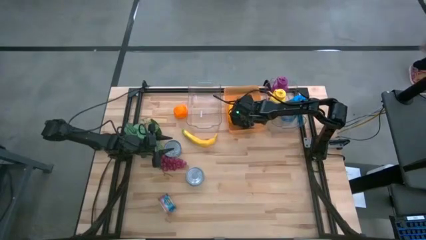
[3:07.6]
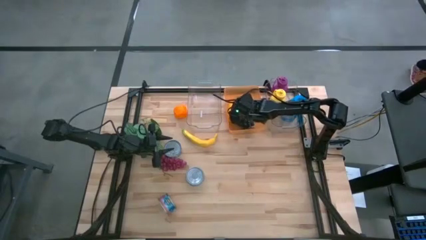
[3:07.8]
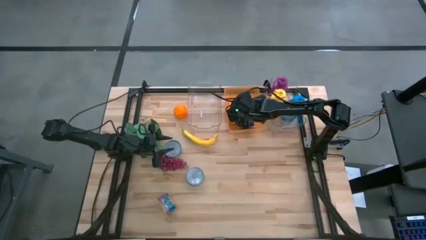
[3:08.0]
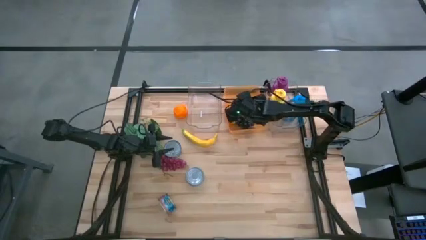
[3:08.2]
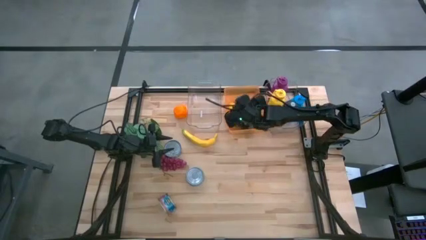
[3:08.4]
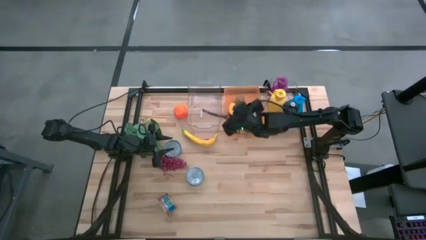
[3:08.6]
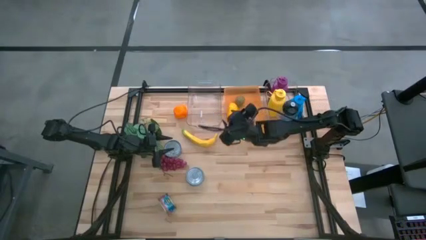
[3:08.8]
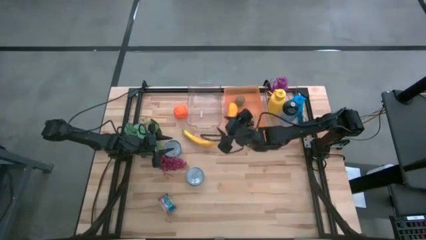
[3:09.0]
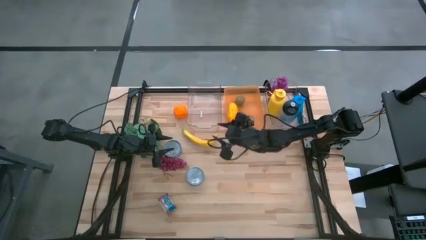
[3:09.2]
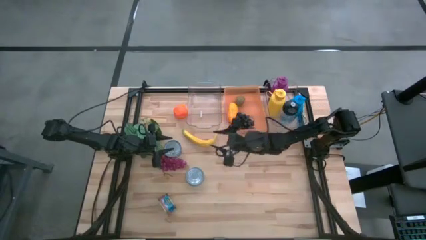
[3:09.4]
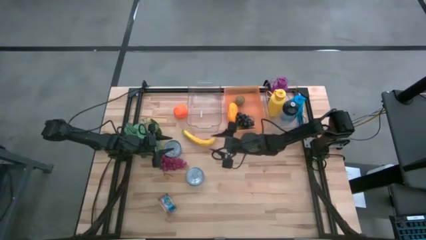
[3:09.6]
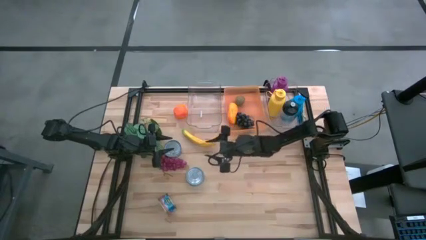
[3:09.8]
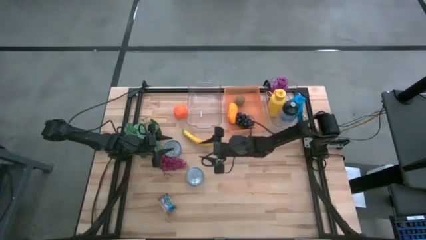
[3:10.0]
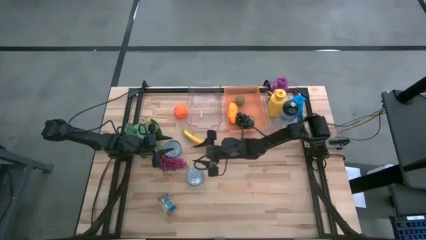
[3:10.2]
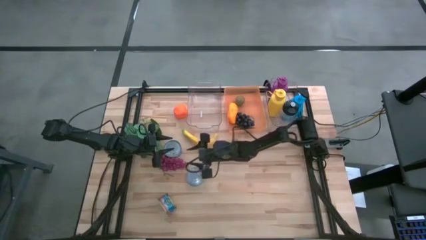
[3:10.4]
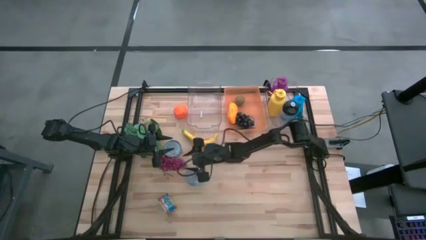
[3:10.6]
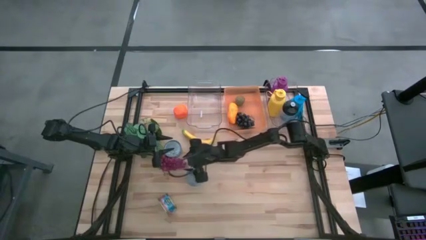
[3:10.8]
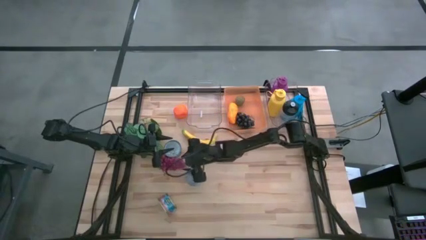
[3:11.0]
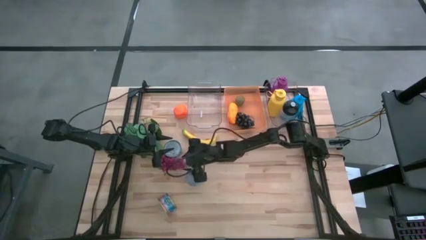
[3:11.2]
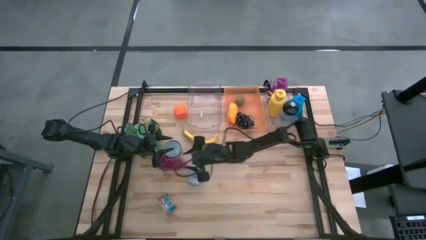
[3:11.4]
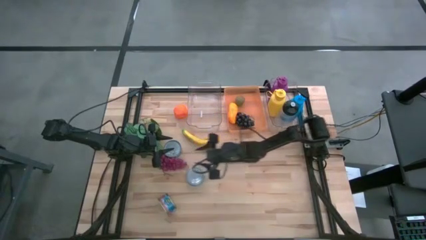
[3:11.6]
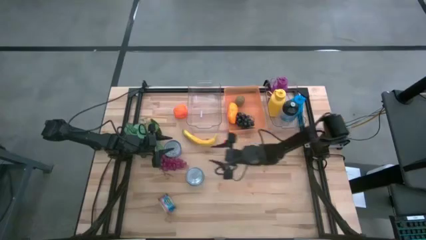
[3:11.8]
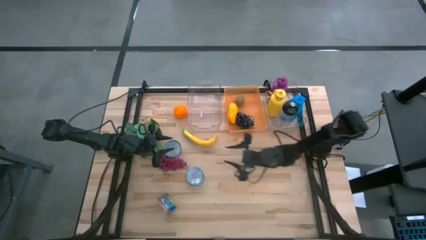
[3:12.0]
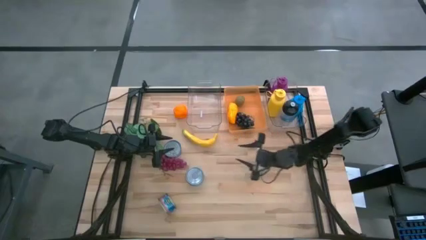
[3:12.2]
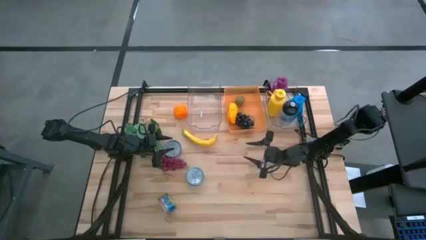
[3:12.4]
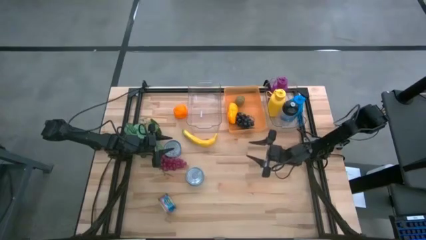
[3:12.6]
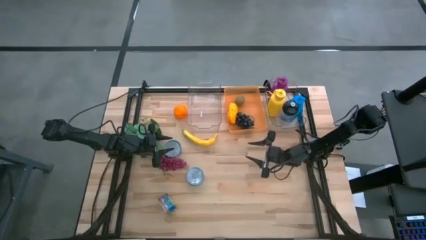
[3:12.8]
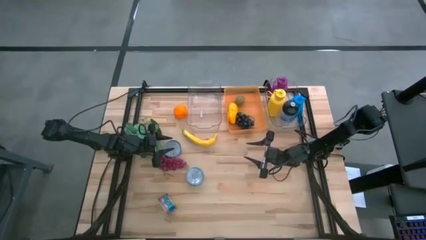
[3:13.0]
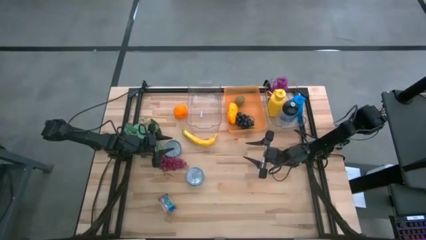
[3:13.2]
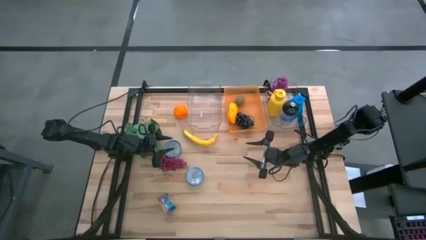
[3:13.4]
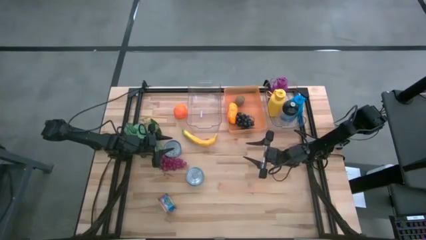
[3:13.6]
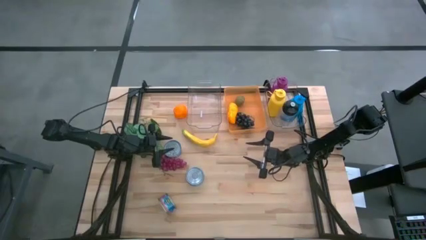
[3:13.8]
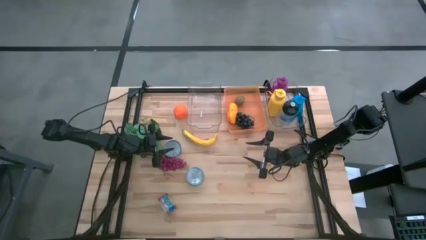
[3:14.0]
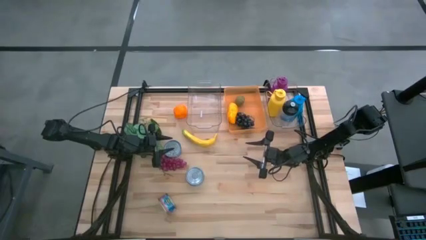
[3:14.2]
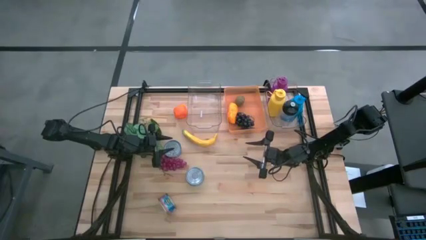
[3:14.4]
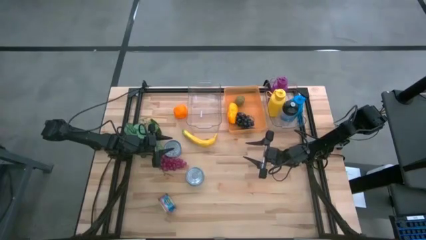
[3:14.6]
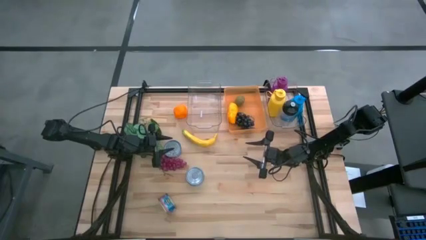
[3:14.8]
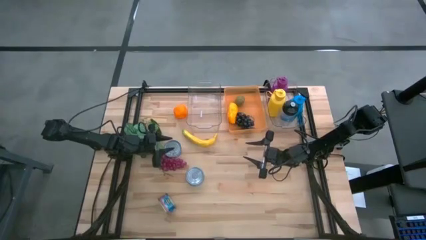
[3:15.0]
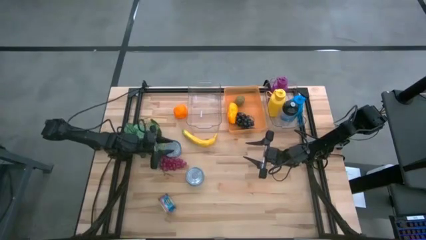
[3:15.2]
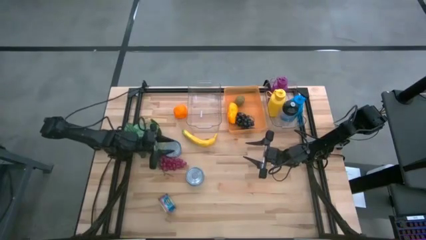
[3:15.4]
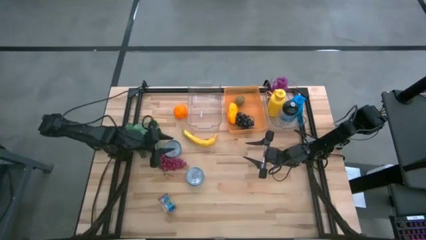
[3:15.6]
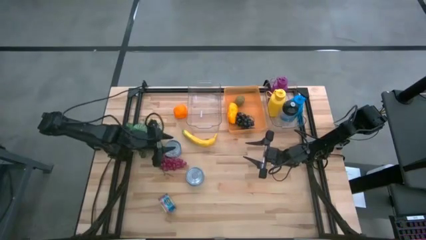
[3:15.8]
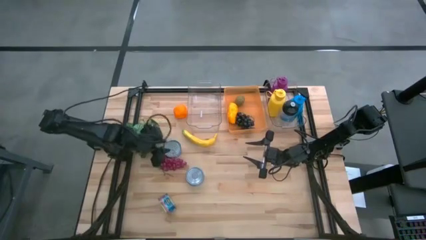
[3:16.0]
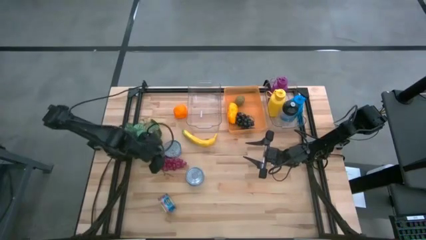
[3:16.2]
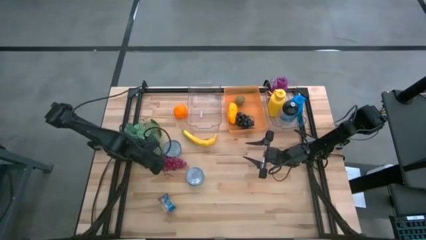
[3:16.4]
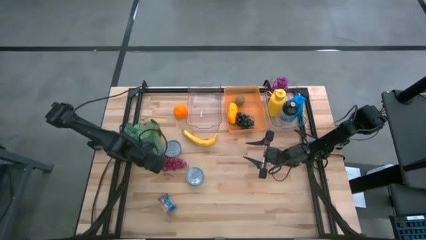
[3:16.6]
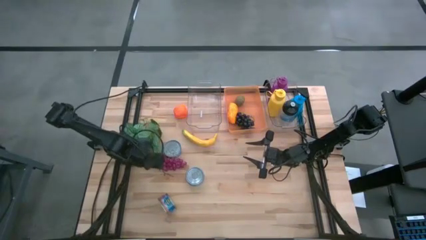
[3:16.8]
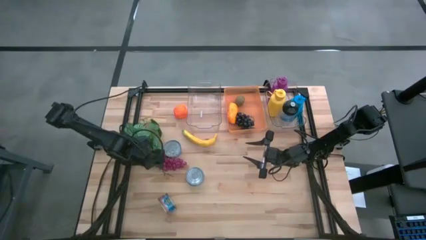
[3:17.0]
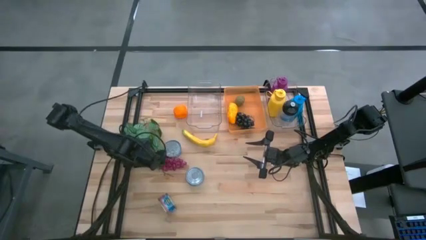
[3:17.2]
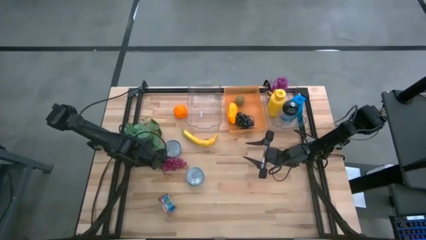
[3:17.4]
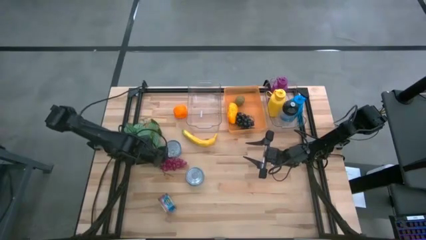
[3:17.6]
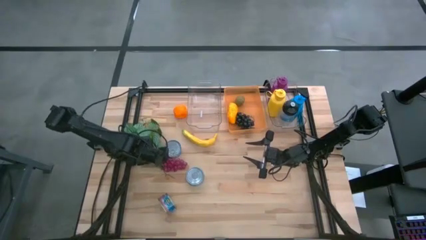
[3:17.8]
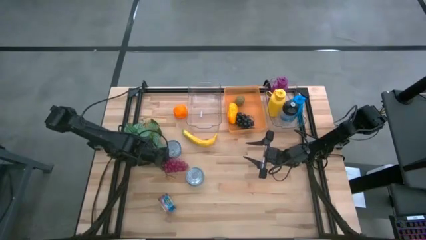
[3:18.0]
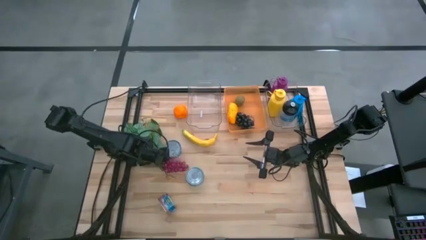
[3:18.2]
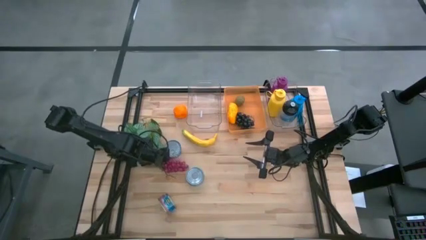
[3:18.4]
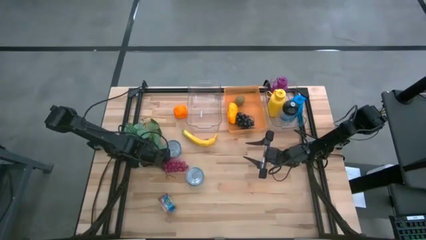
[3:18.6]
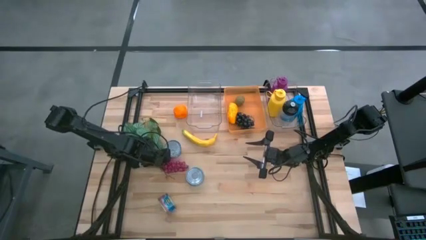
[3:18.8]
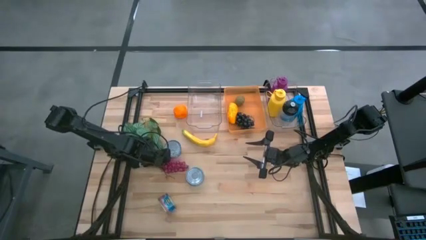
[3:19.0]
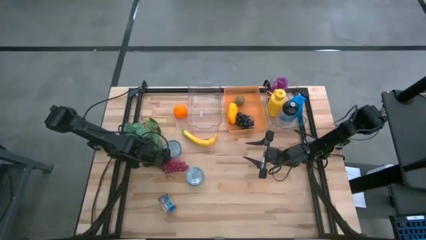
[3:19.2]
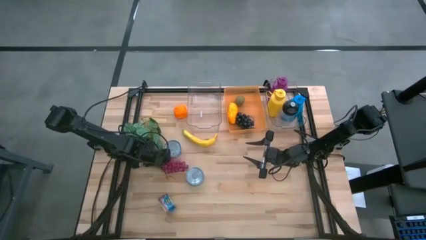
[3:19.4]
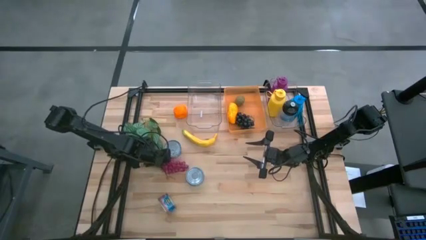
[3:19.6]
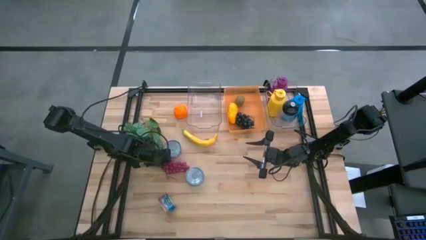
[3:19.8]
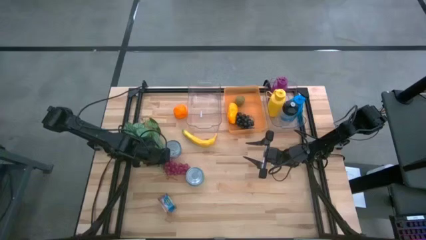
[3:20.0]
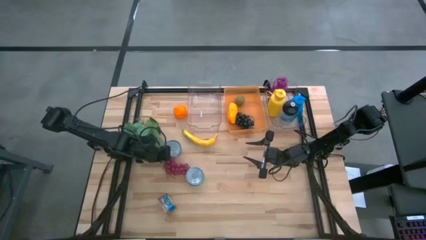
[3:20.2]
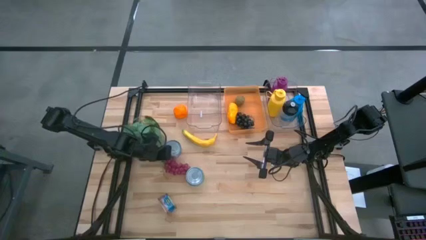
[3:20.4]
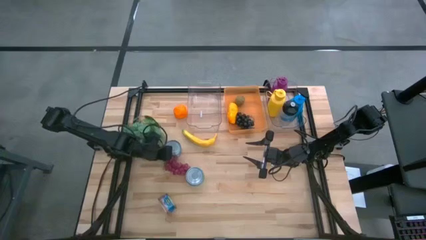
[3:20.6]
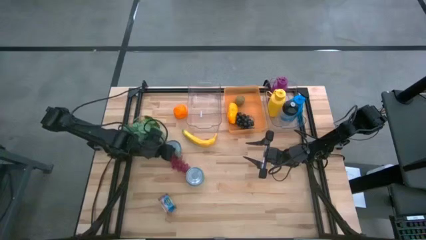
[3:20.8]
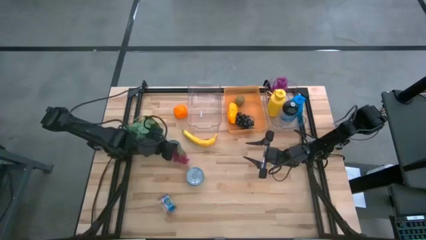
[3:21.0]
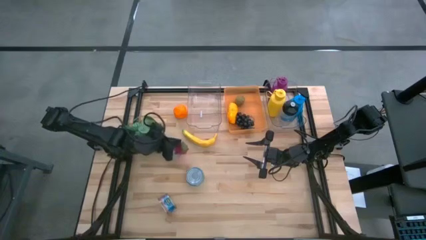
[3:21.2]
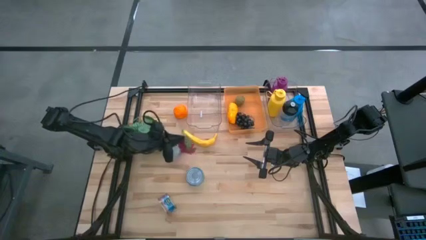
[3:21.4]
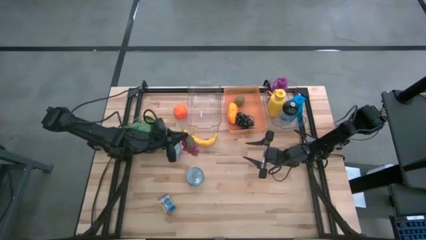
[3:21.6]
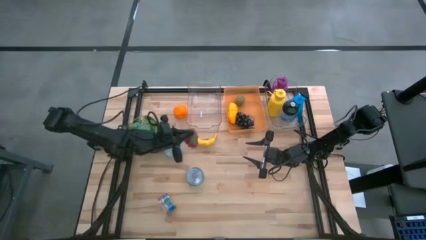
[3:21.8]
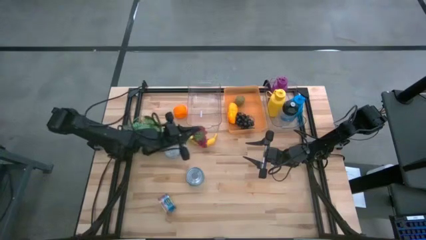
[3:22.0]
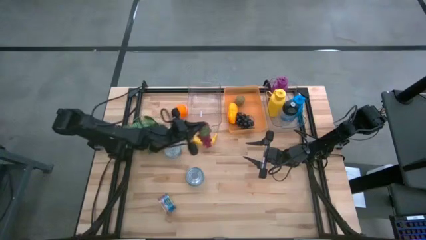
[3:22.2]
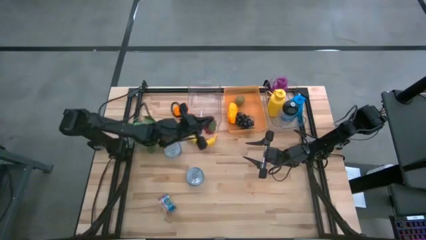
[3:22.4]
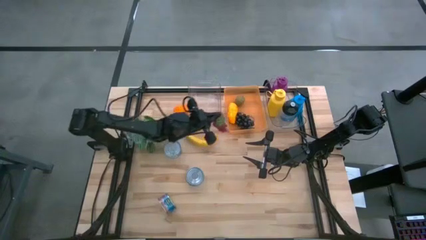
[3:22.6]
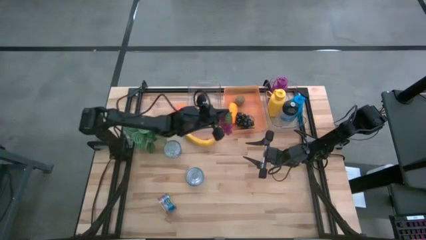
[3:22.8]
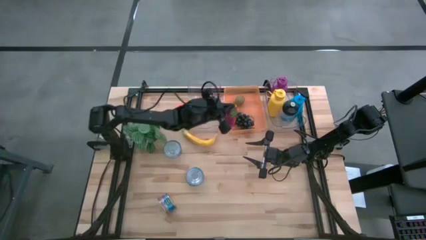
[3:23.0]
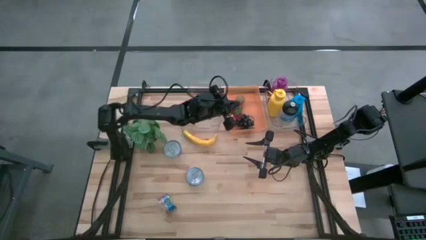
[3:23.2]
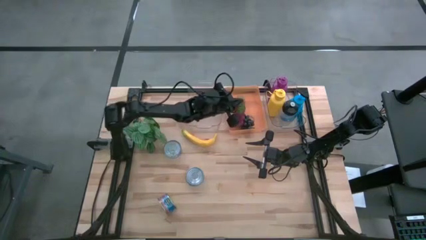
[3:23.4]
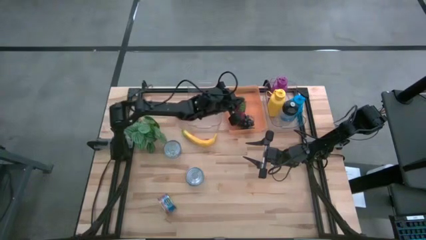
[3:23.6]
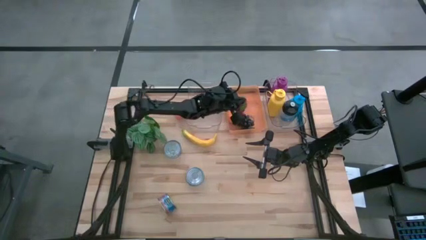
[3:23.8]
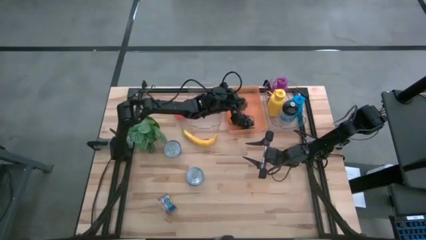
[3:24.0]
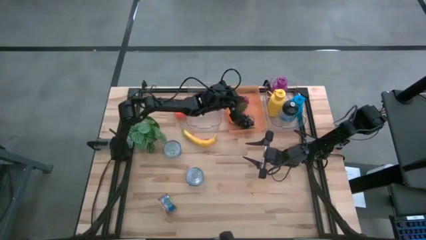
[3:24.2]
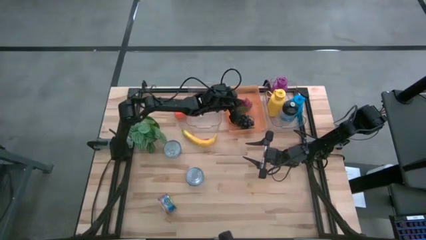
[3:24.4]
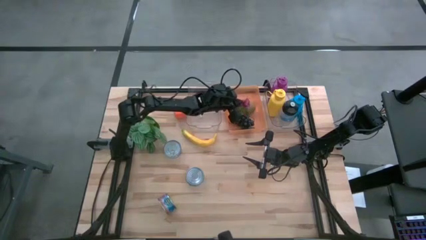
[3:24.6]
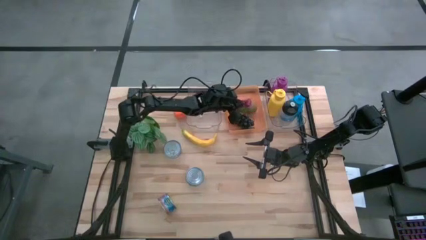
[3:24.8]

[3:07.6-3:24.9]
Task: Pick & Place Food Item
Put the purple grapes into the orange bin
